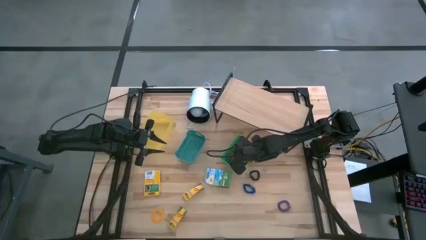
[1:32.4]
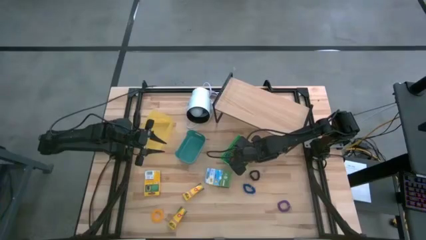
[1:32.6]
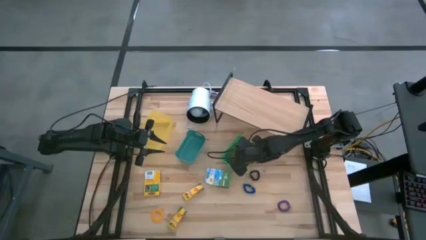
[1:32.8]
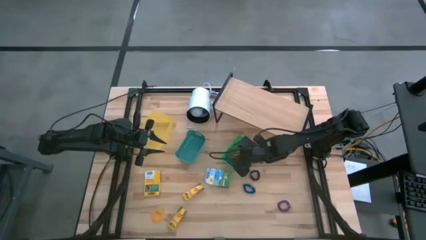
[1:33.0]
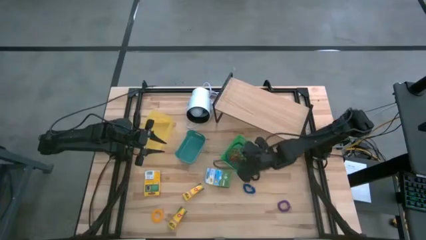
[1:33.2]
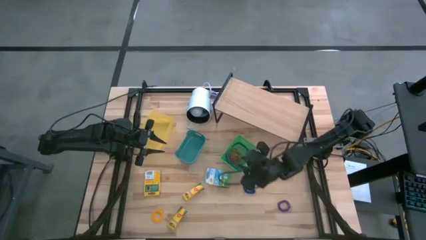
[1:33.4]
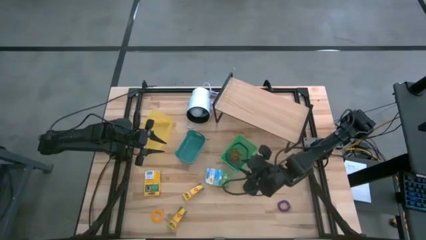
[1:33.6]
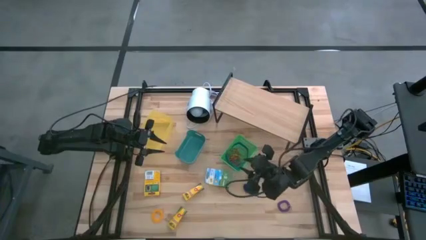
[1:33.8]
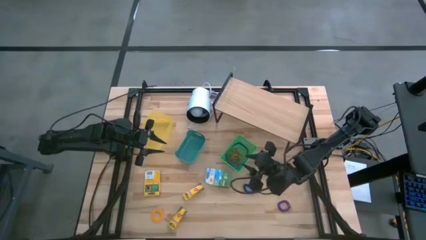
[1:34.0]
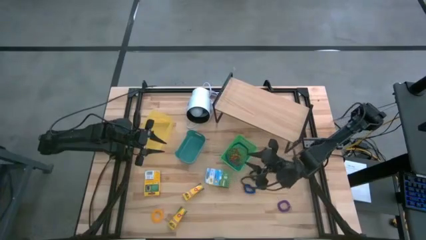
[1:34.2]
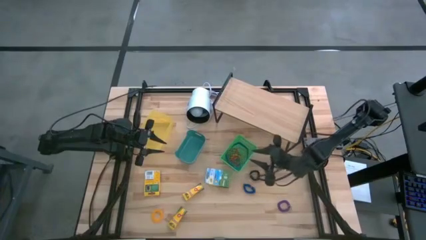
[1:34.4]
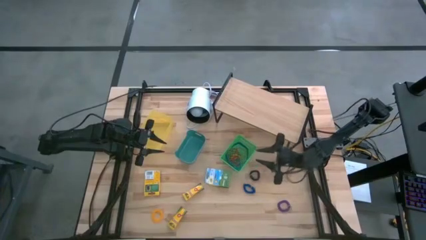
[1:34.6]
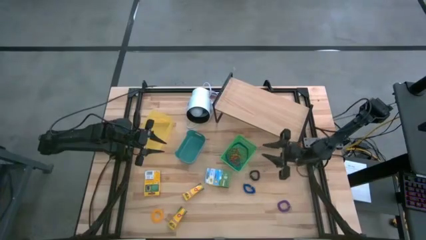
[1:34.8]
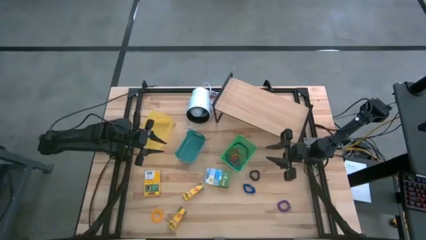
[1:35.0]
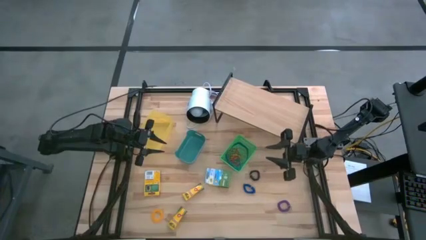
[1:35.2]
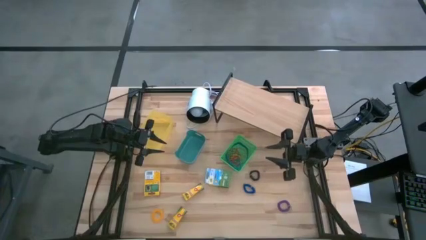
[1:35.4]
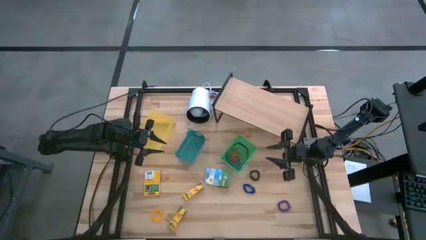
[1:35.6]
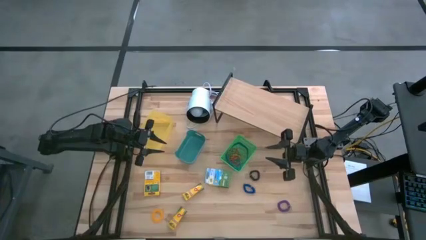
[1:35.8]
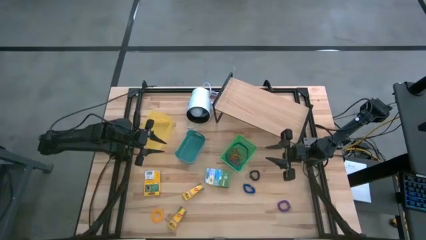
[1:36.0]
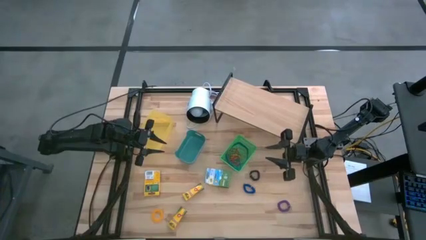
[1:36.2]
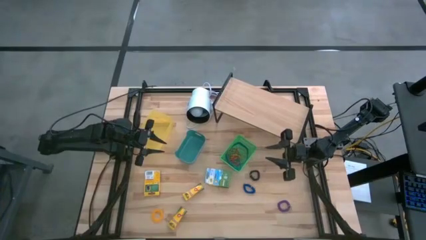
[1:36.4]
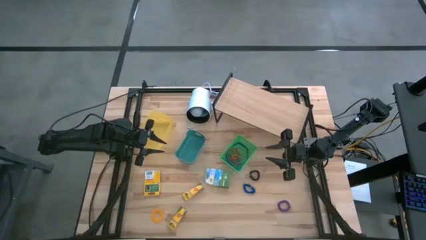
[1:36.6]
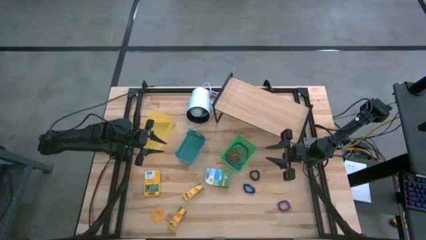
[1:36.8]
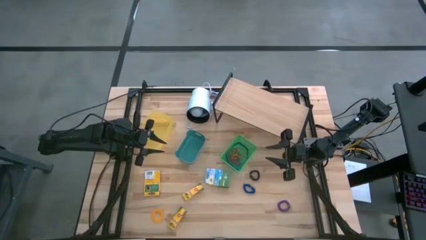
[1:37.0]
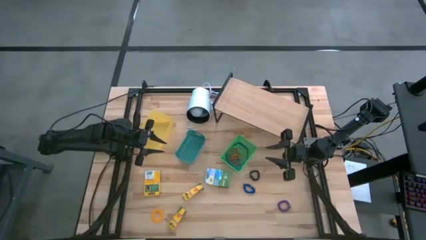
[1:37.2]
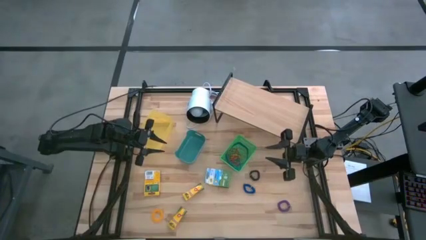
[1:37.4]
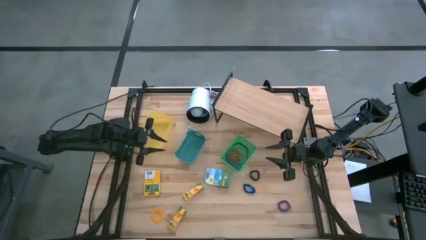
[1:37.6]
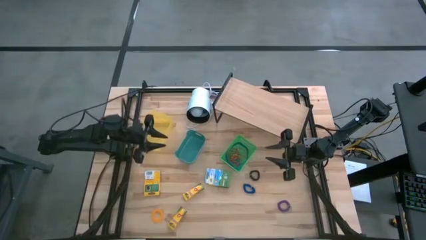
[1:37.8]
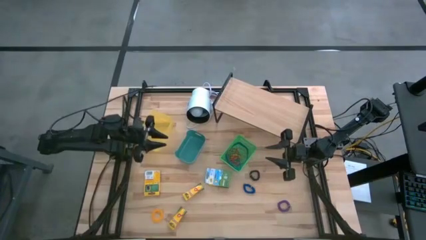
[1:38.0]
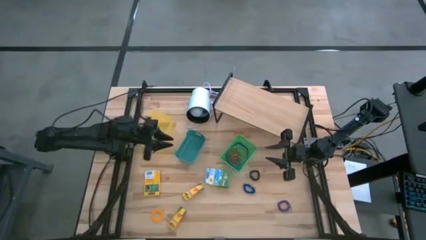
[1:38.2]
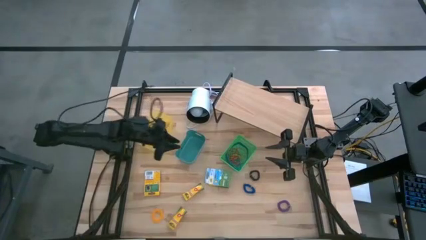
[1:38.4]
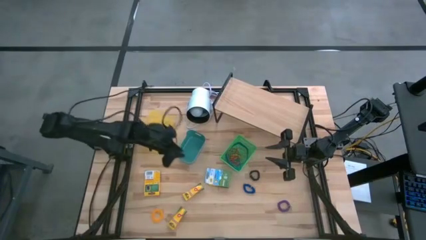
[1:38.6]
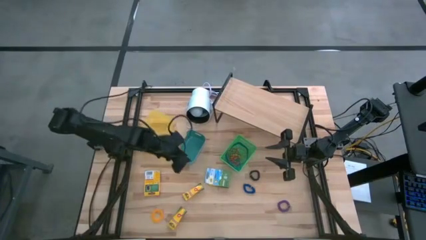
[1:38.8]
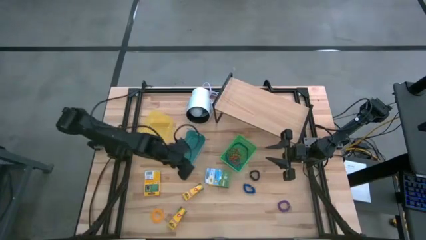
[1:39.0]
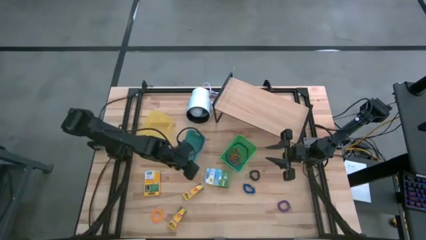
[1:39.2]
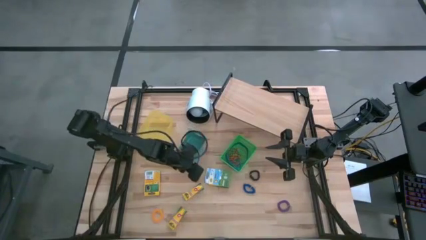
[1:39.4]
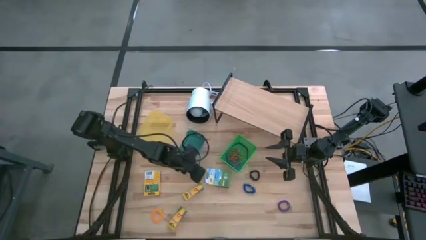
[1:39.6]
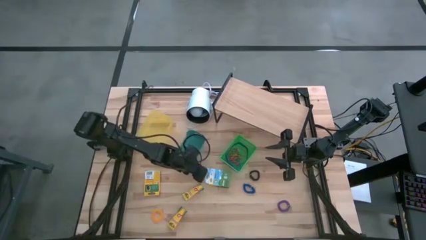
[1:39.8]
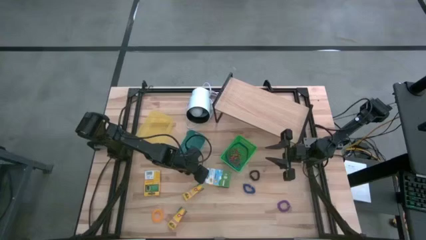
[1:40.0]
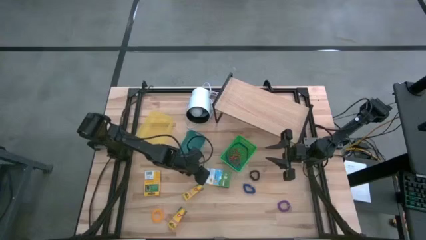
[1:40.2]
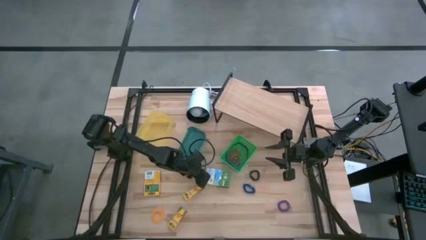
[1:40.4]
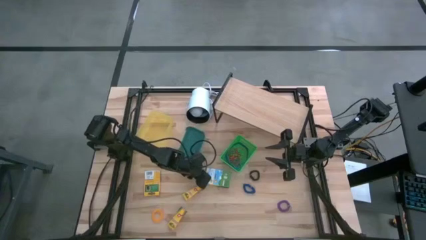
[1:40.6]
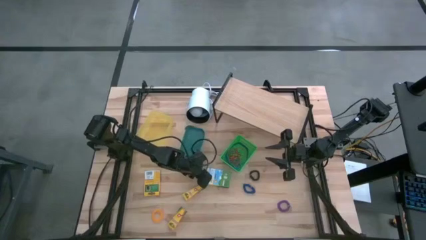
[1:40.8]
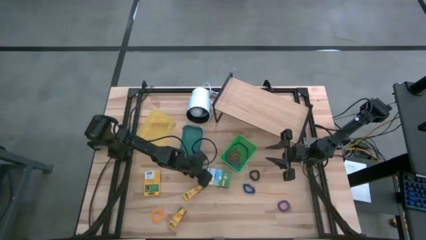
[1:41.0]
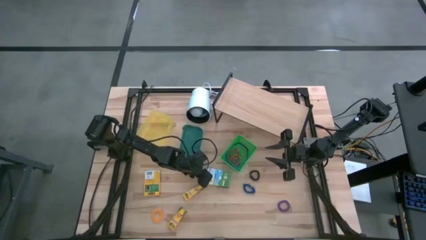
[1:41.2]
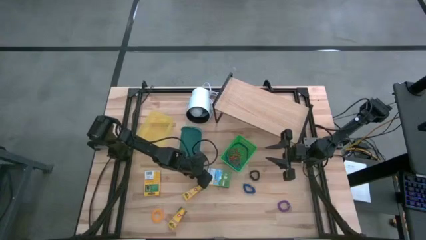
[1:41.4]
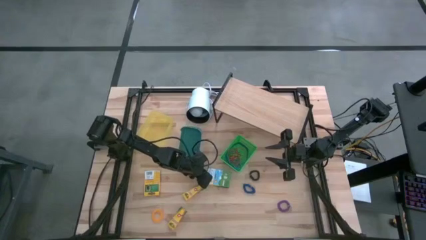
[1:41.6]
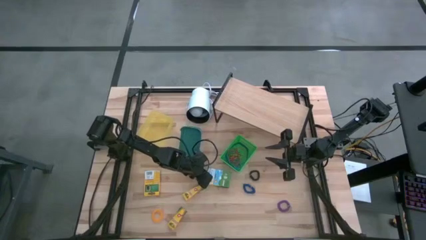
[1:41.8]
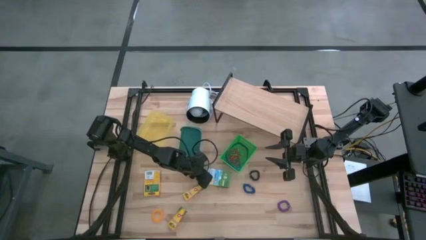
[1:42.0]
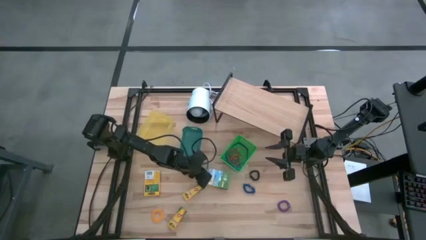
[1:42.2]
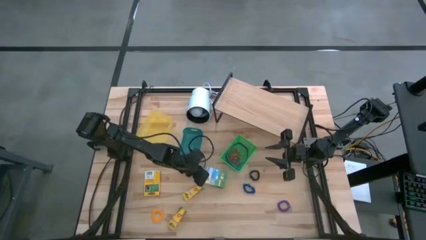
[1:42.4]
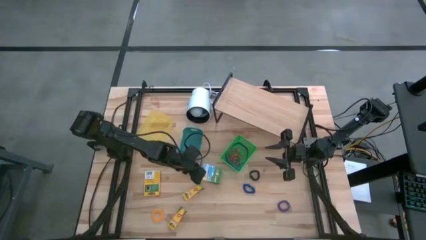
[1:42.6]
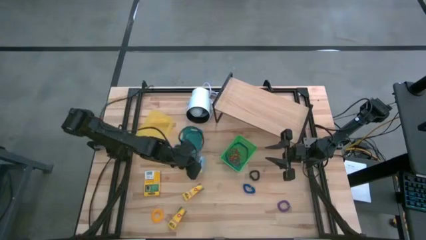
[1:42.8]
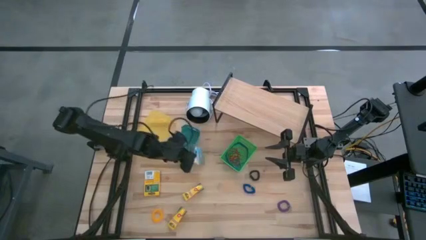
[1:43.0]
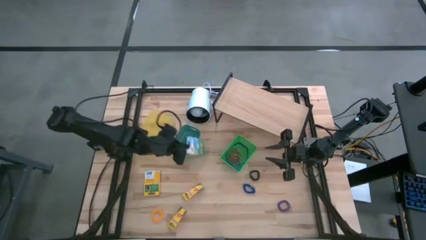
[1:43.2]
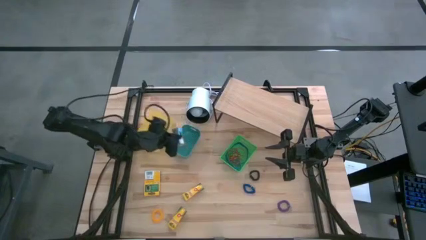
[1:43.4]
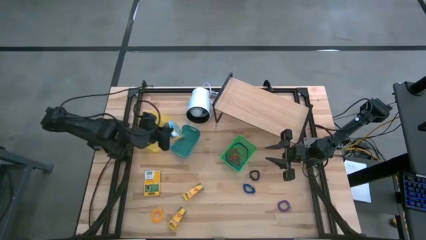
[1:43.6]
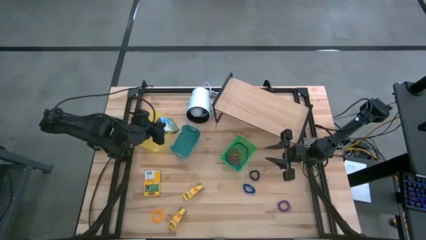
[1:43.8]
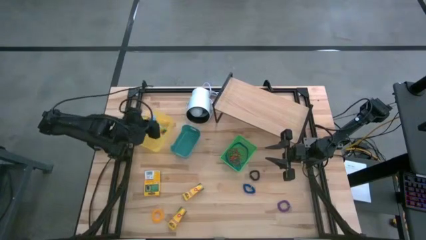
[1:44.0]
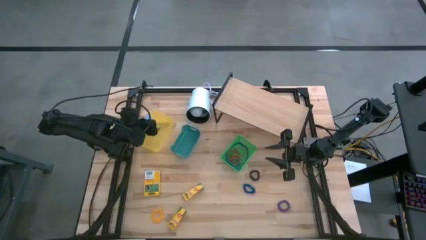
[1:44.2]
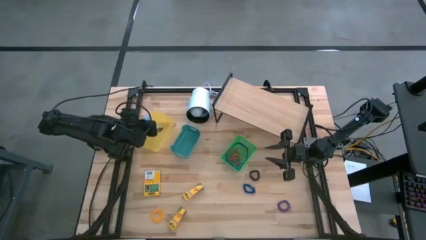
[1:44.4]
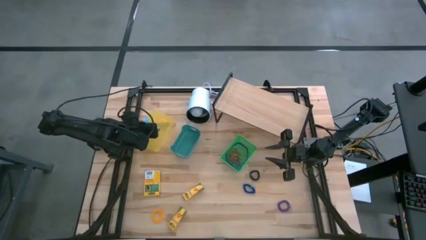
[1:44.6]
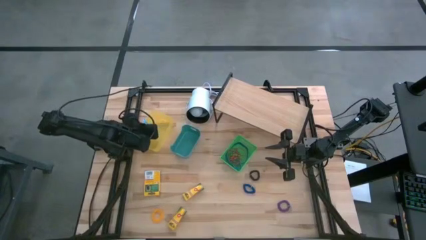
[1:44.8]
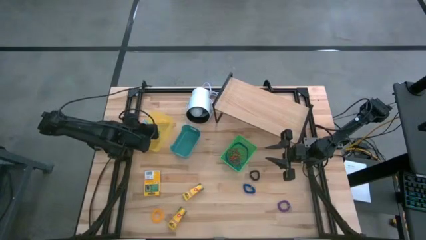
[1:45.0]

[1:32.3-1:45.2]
Task: Pick & Place Office Desk Supplies
Put the right big yellow crayon box into the yellow bin
